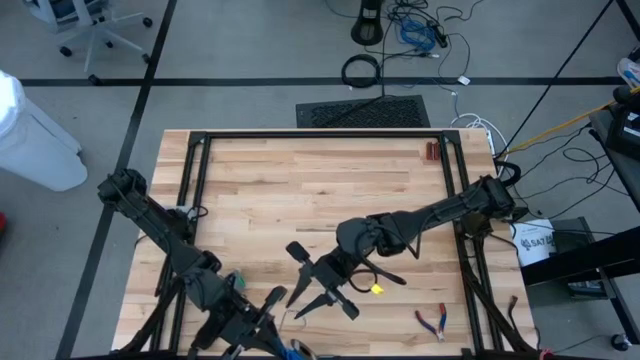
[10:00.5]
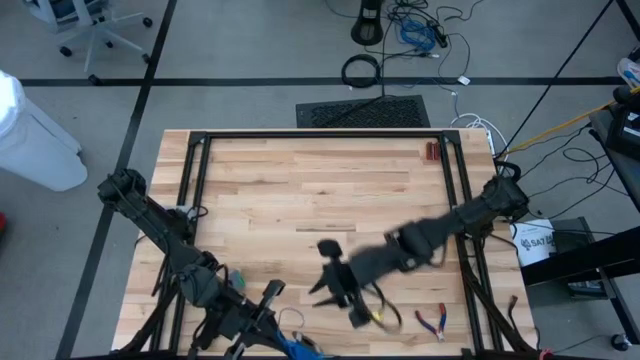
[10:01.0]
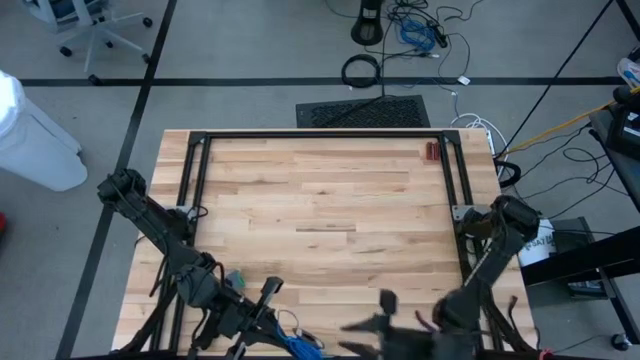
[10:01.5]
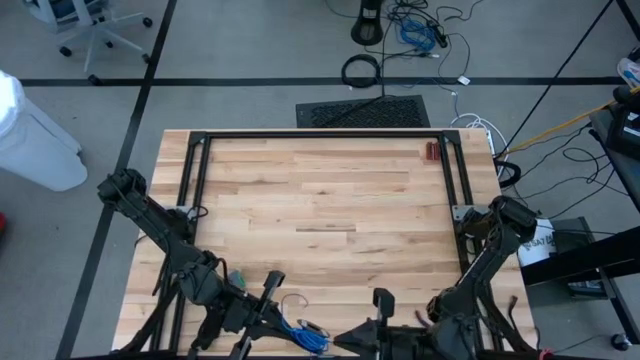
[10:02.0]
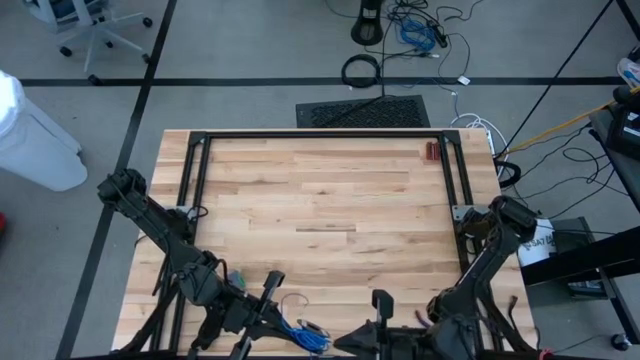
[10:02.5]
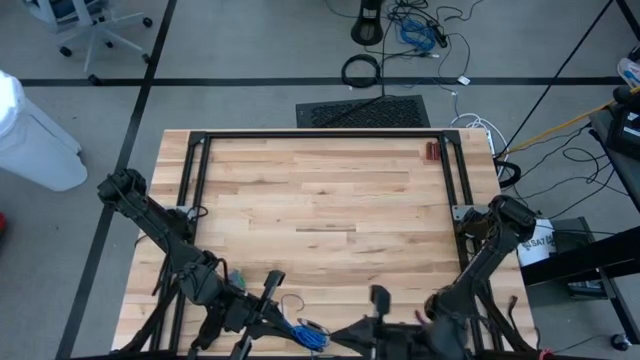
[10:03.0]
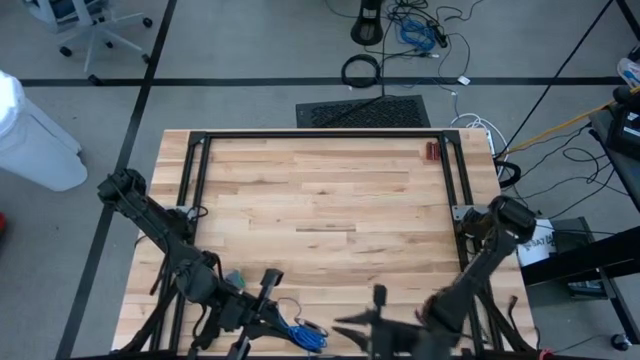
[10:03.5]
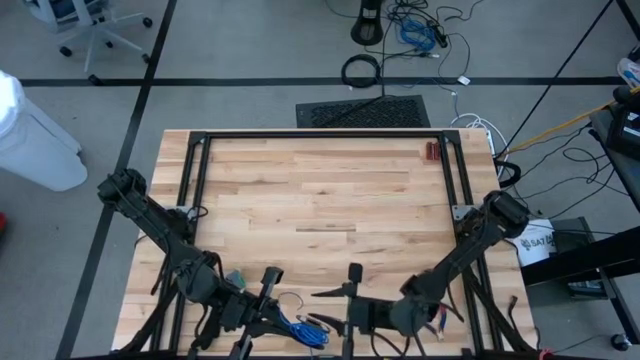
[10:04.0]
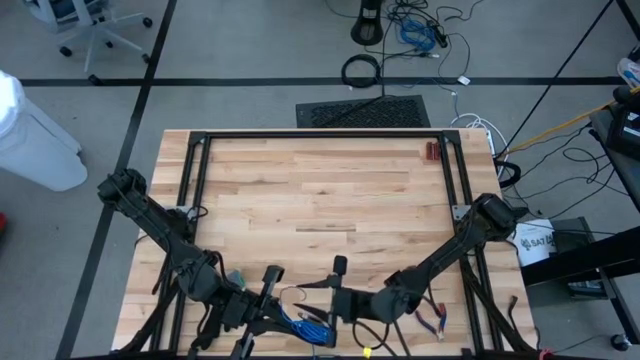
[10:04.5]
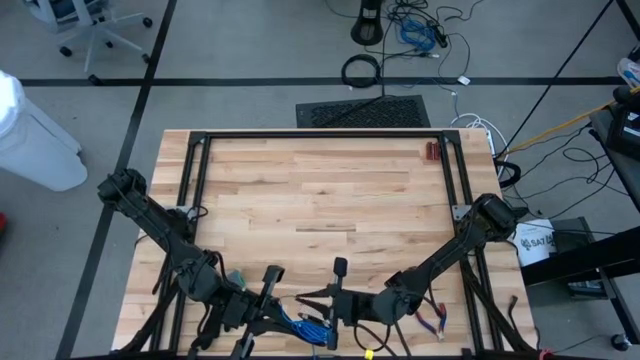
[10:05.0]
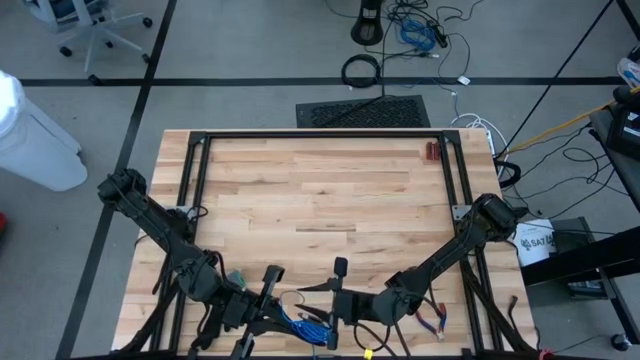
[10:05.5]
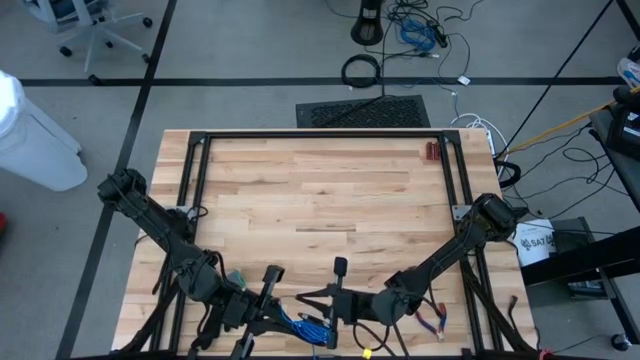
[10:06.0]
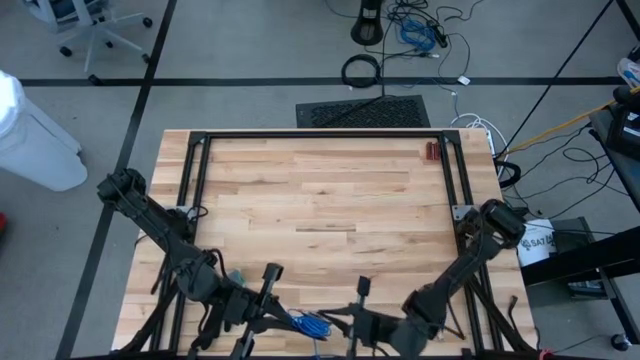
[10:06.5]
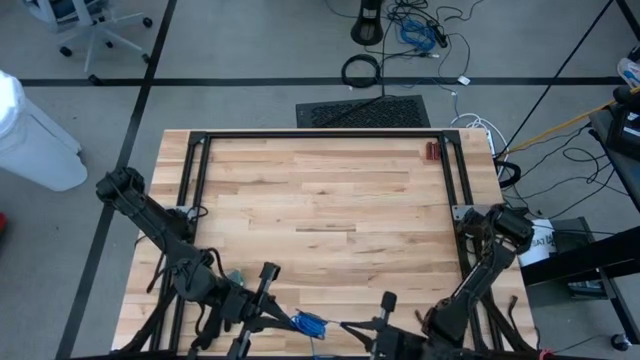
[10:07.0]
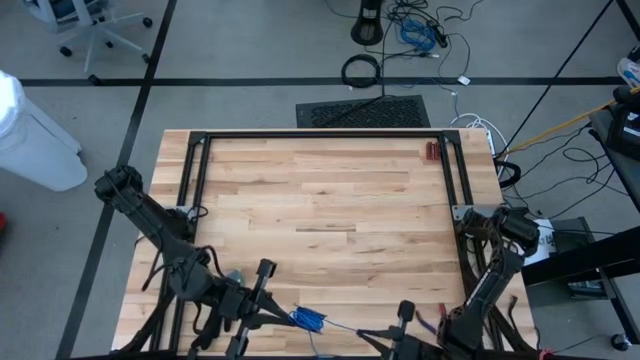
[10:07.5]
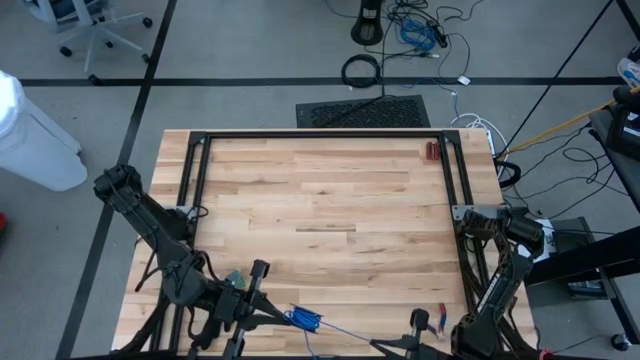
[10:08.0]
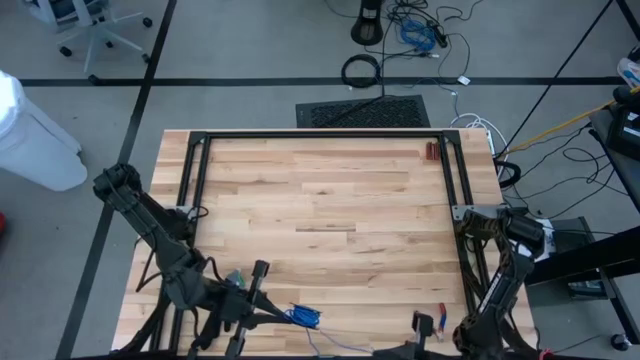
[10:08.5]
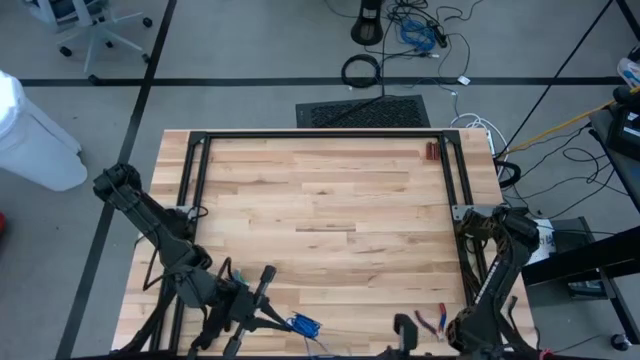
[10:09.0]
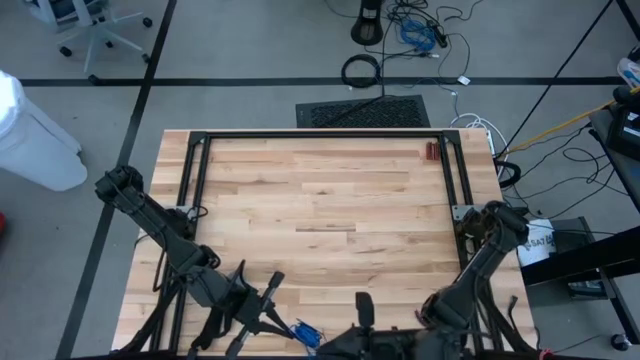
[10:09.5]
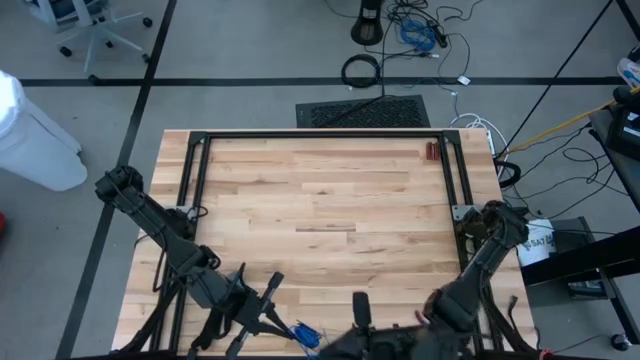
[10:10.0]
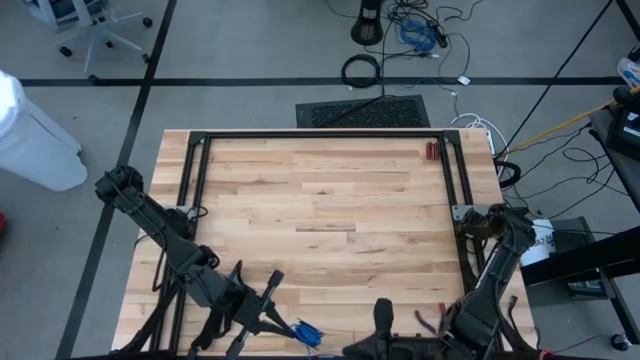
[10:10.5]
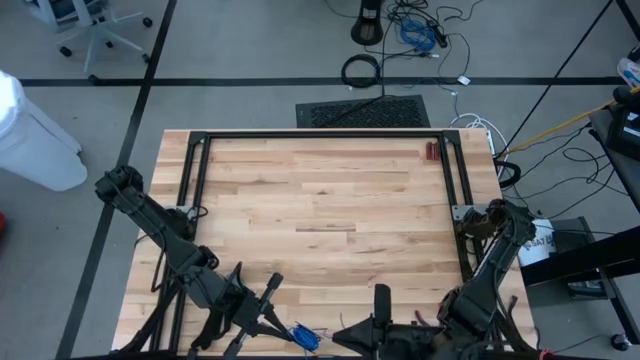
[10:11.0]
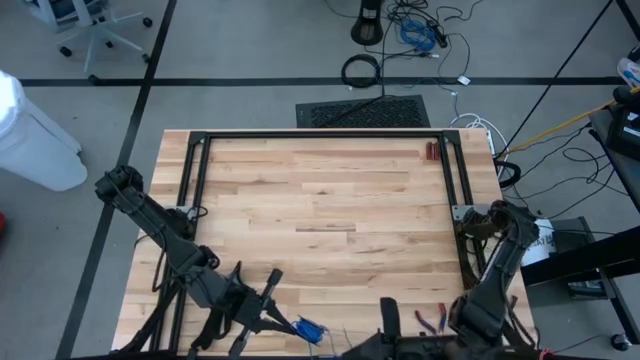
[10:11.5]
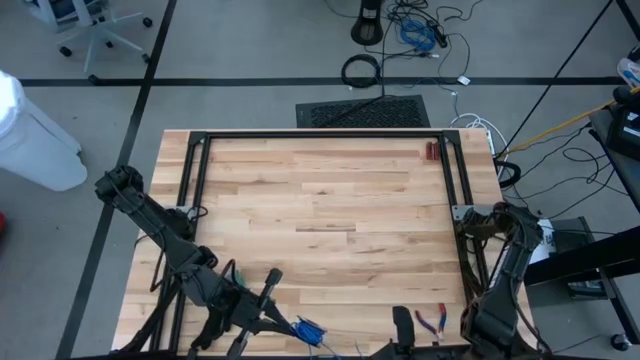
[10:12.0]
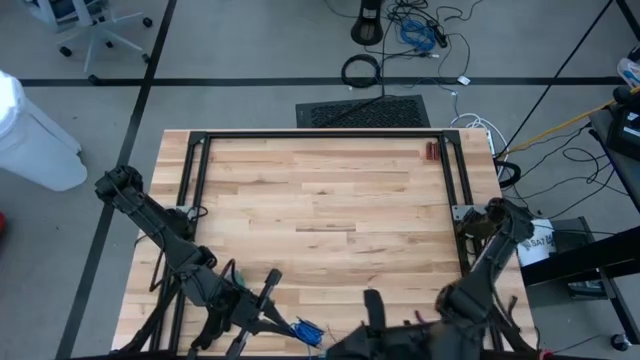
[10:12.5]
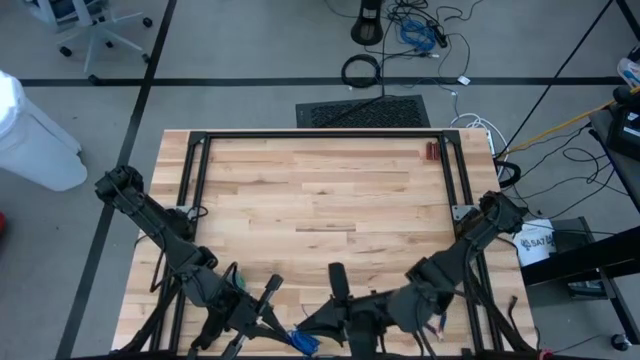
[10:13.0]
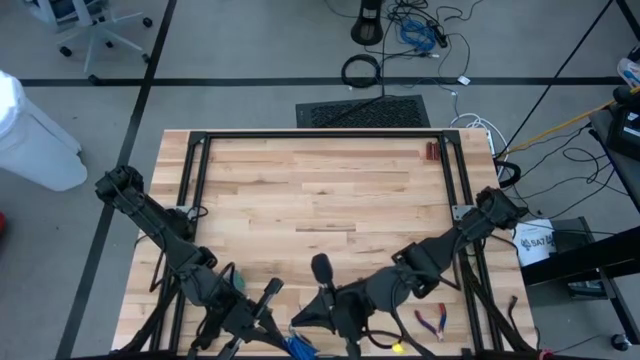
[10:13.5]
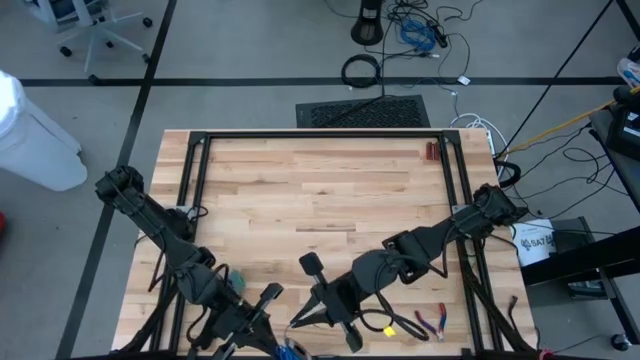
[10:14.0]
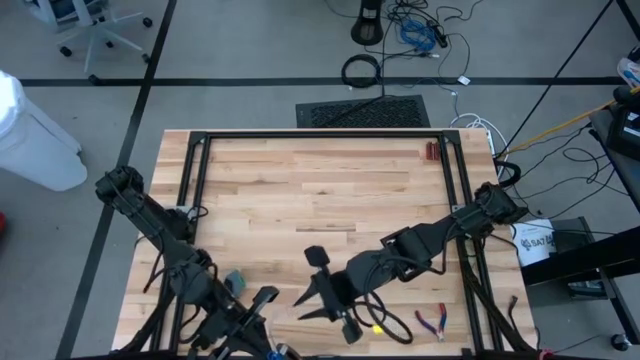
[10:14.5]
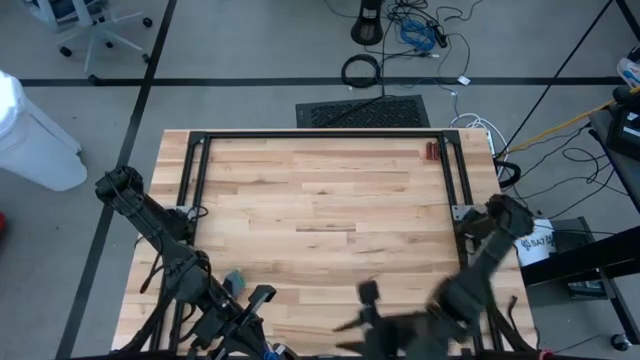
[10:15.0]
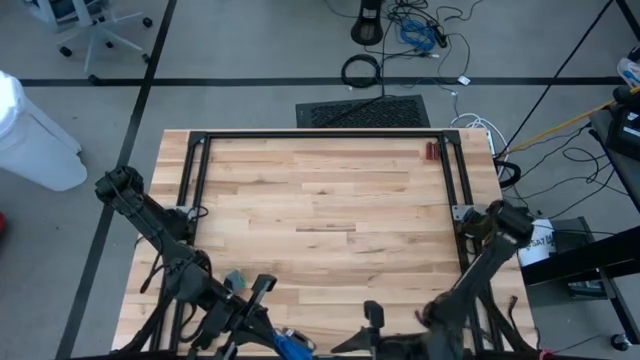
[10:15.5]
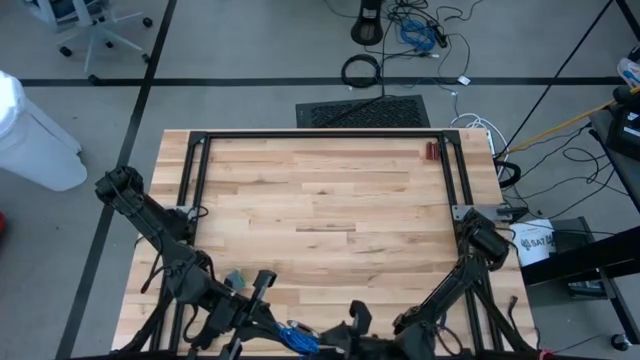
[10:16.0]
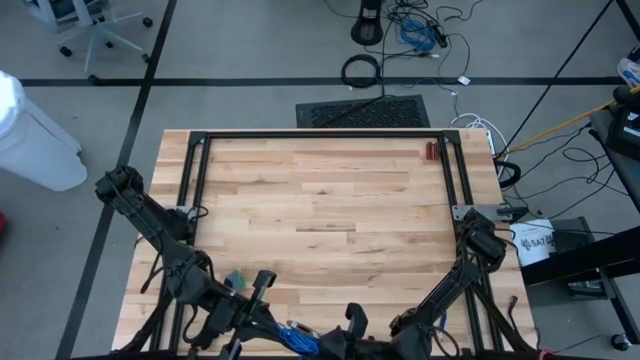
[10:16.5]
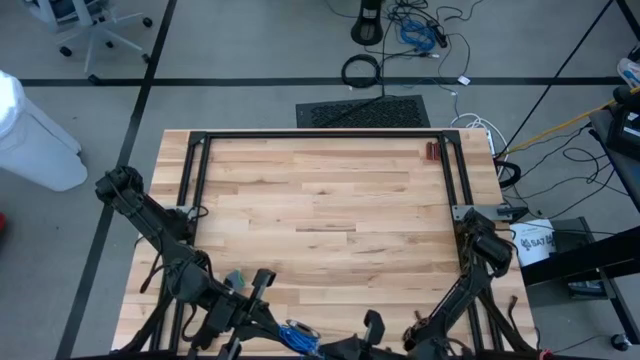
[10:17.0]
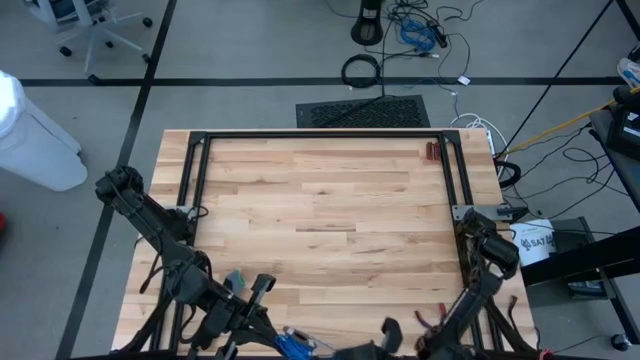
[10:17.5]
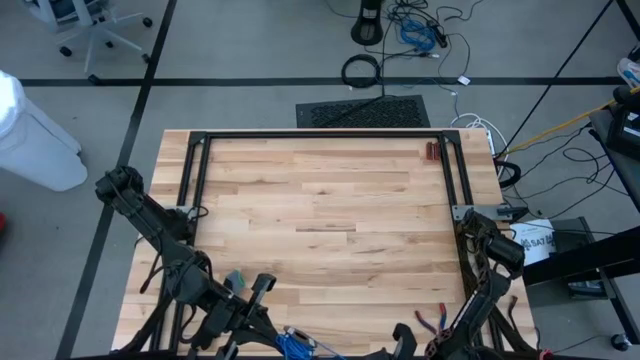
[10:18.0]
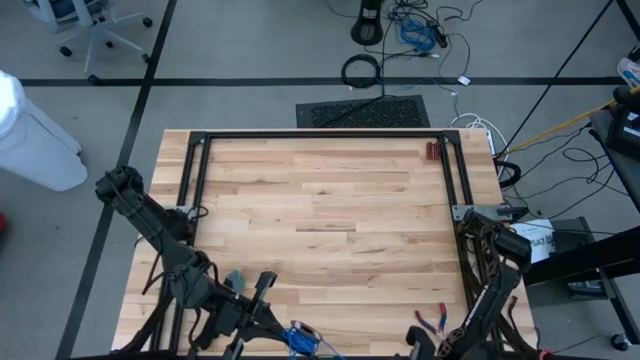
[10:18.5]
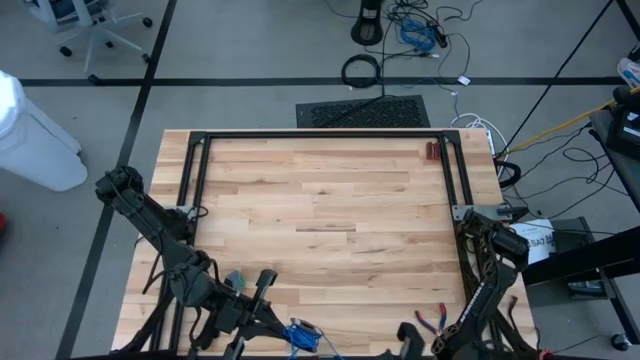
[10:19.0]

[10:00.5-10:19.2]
Task: Coil cords
Coil the blue wire onto the black spool

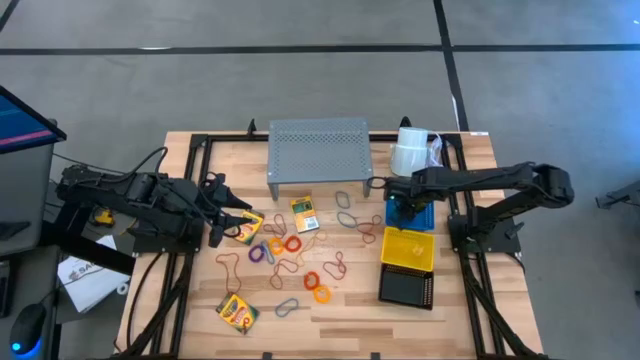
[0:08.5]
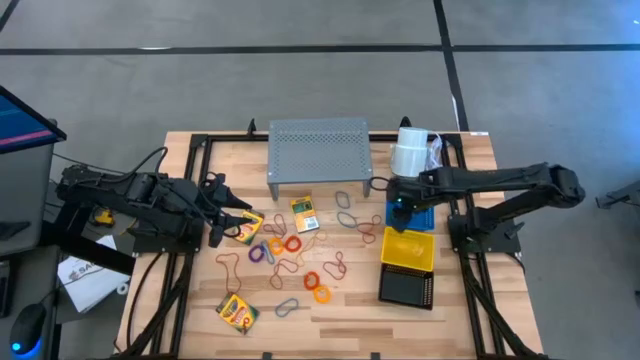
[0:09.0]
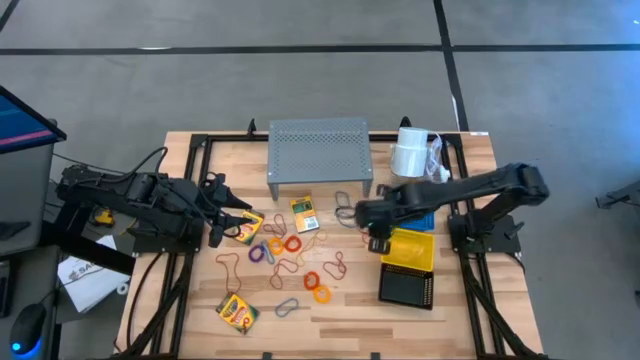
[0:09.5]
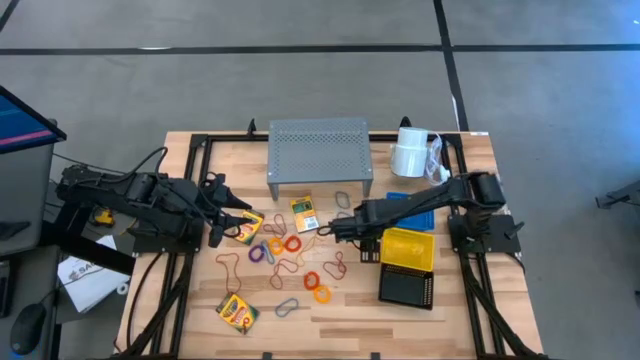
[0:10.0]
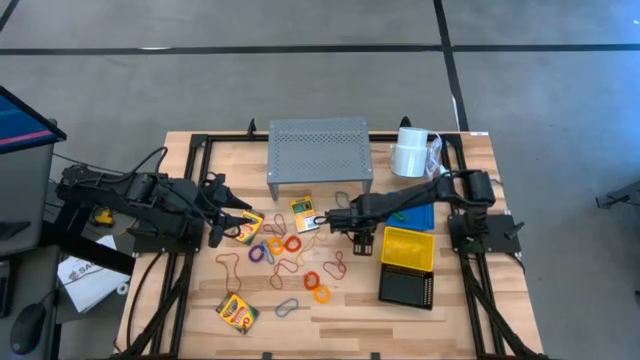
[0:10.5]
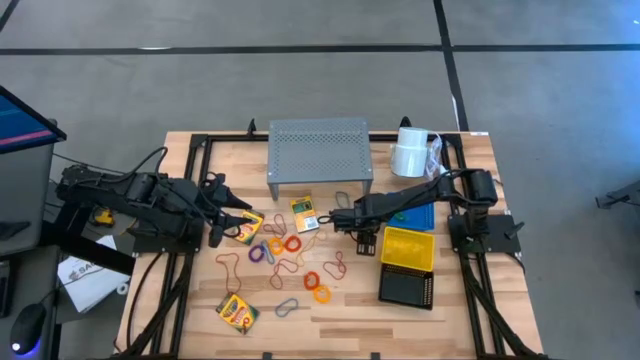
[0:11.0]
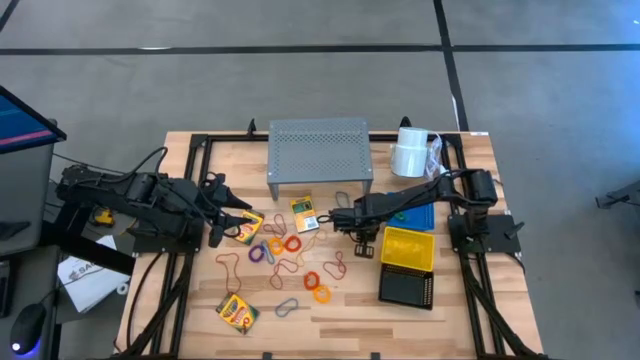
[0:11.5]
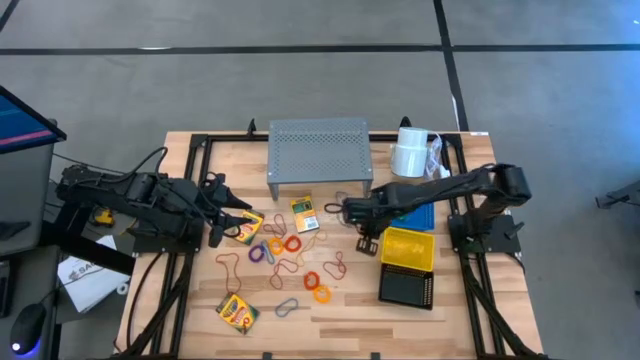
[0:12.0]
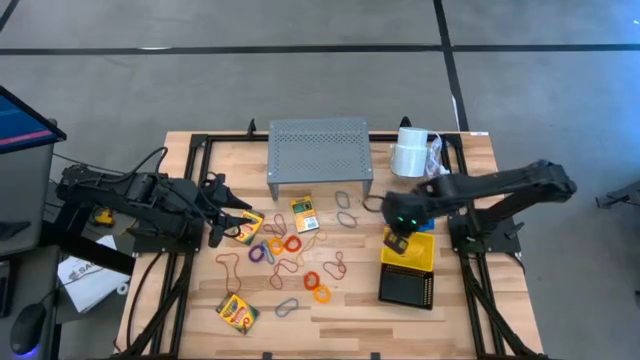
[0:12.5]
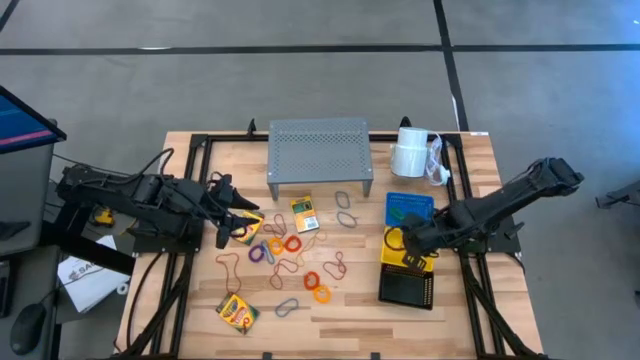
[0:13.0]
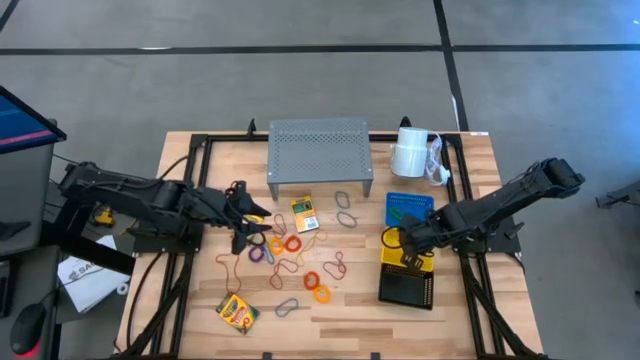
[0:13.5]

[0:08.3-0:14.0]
Task: Pick & Place Office Desk Supplies
Put the red rubber band into the yellow basket
